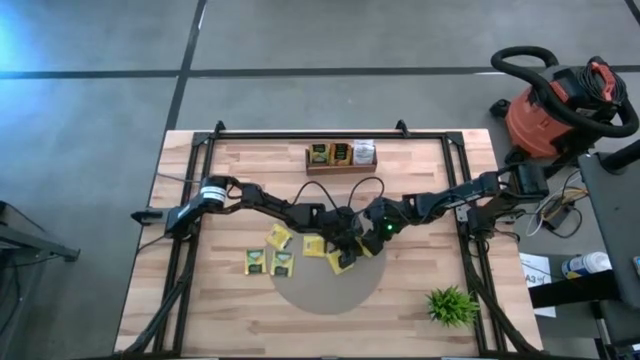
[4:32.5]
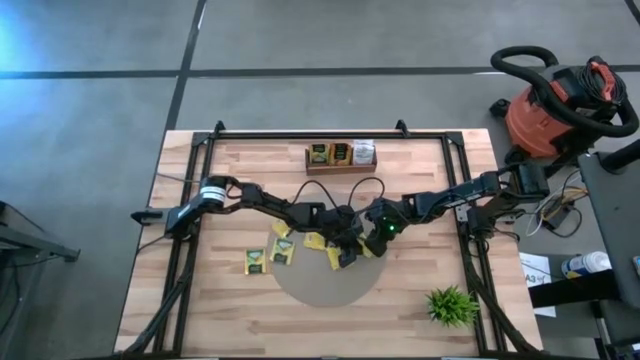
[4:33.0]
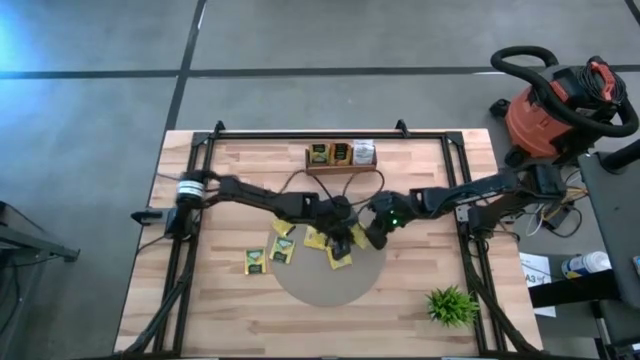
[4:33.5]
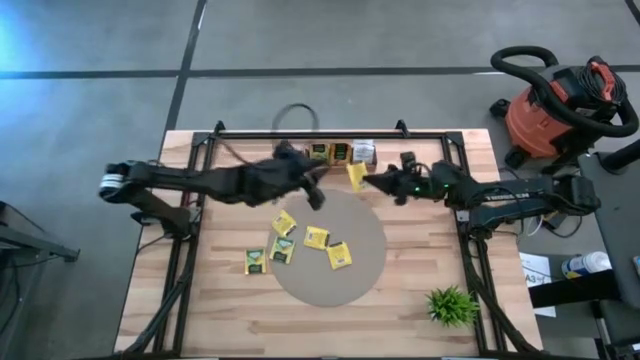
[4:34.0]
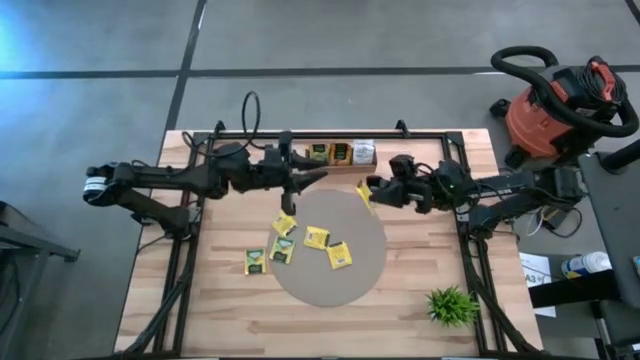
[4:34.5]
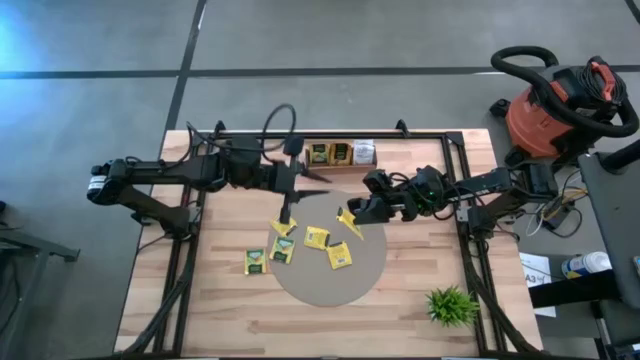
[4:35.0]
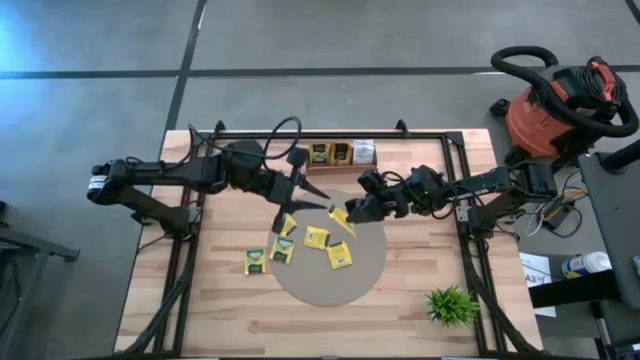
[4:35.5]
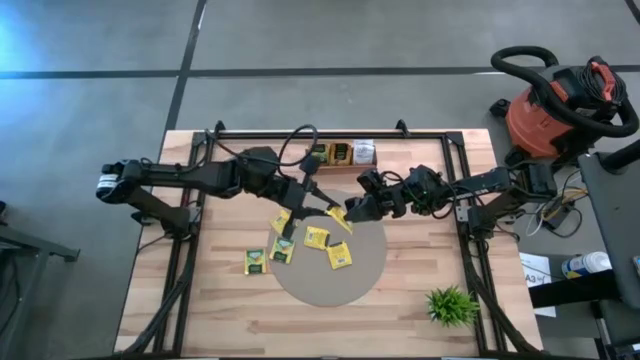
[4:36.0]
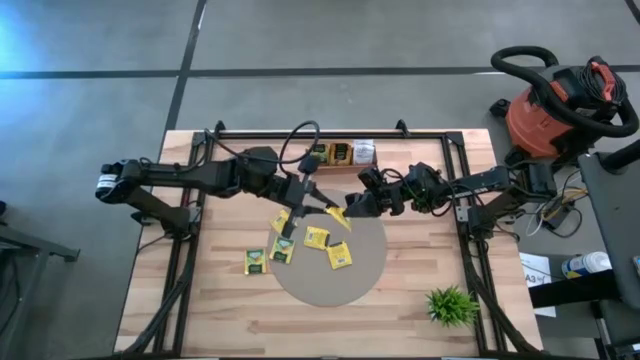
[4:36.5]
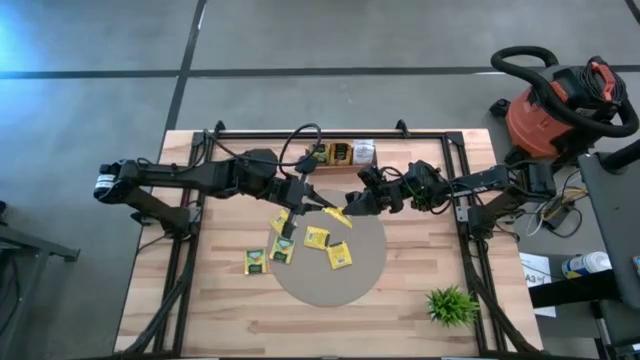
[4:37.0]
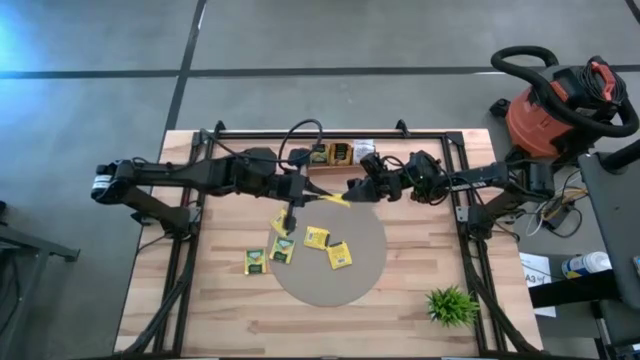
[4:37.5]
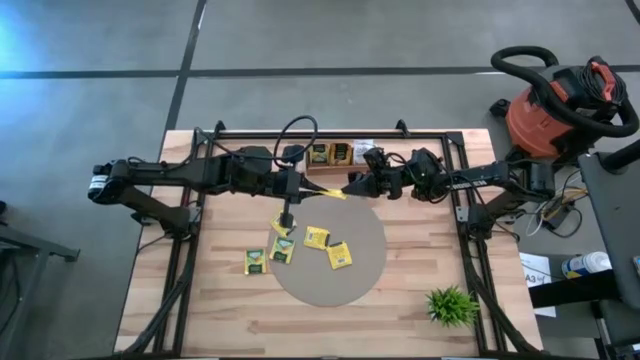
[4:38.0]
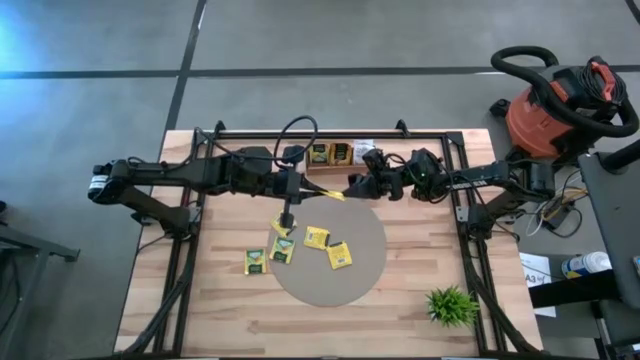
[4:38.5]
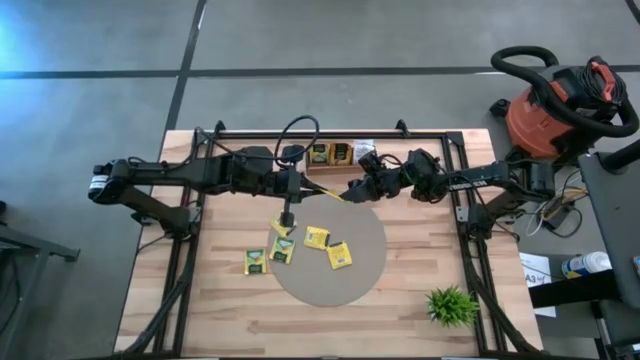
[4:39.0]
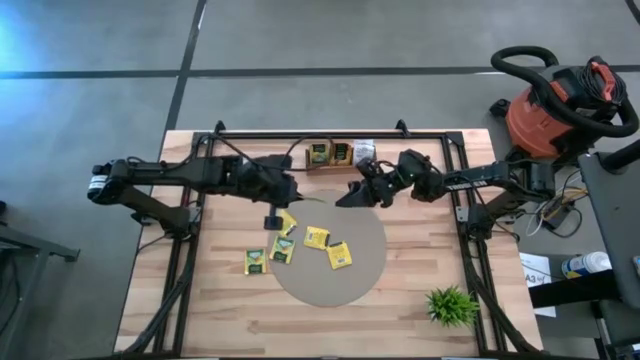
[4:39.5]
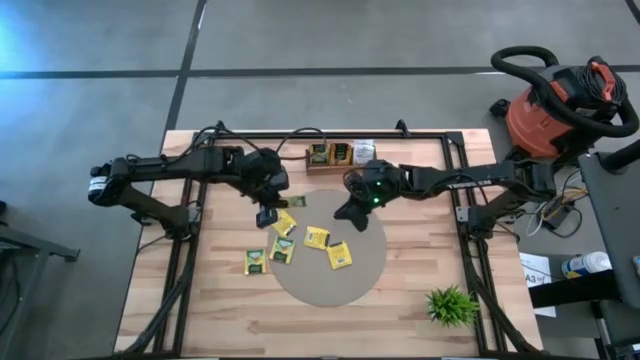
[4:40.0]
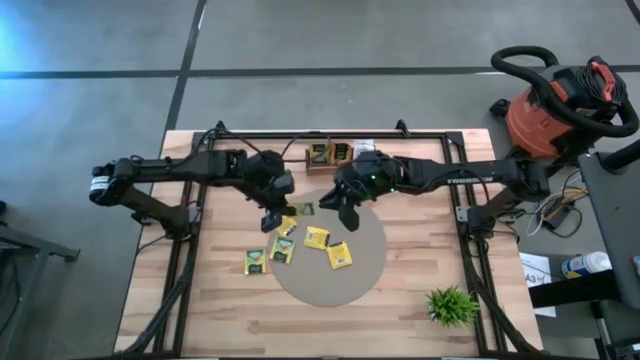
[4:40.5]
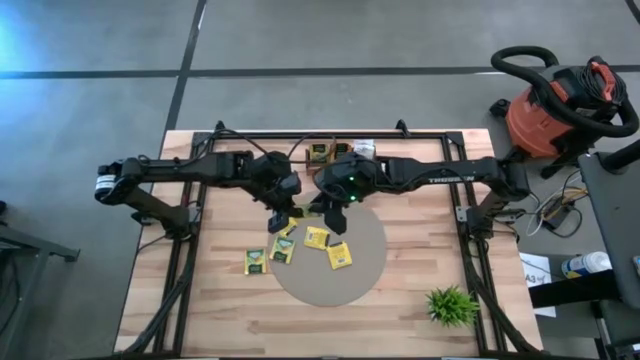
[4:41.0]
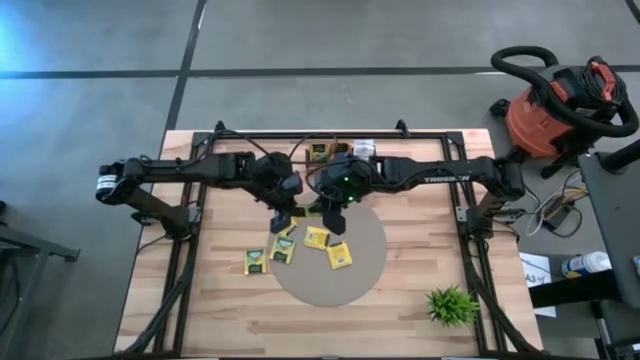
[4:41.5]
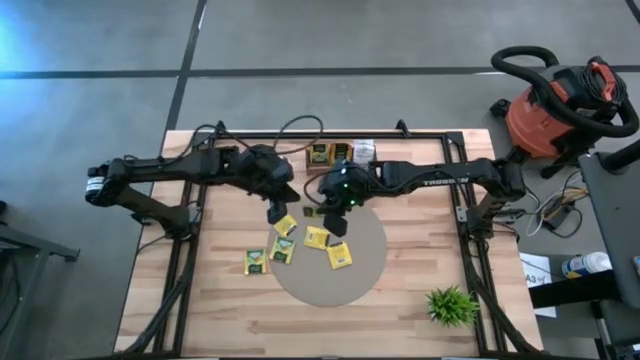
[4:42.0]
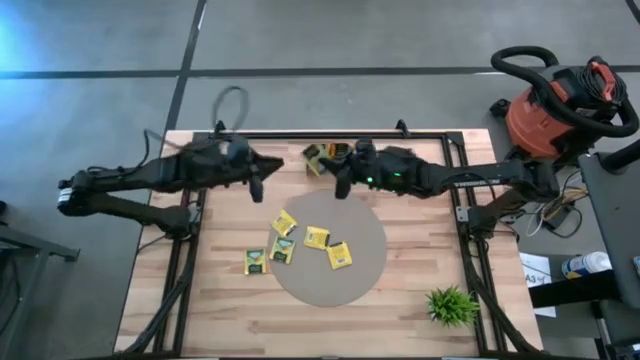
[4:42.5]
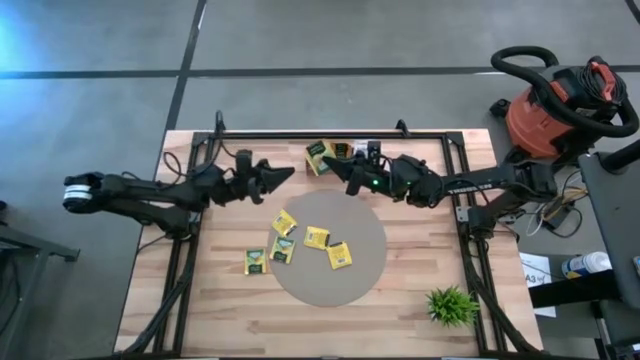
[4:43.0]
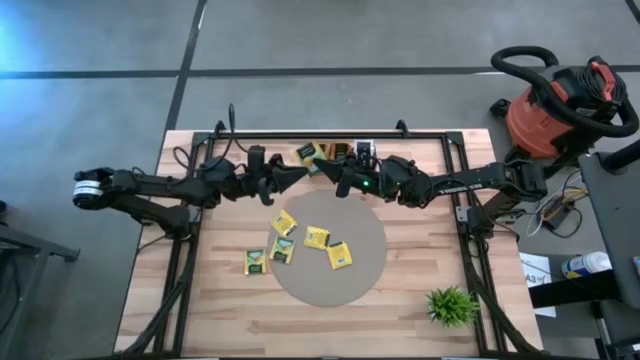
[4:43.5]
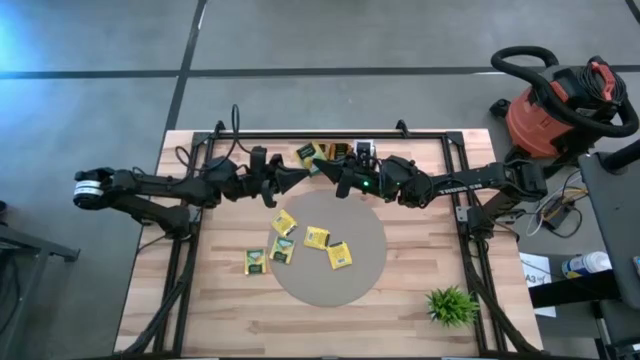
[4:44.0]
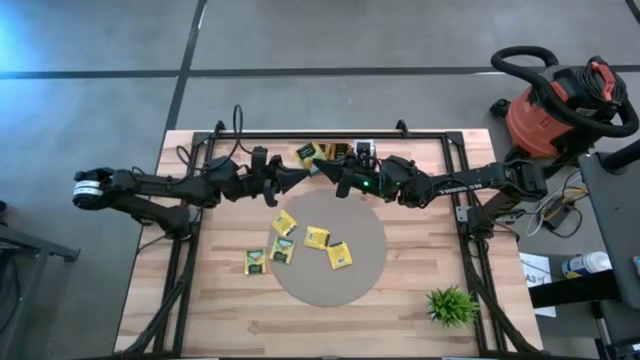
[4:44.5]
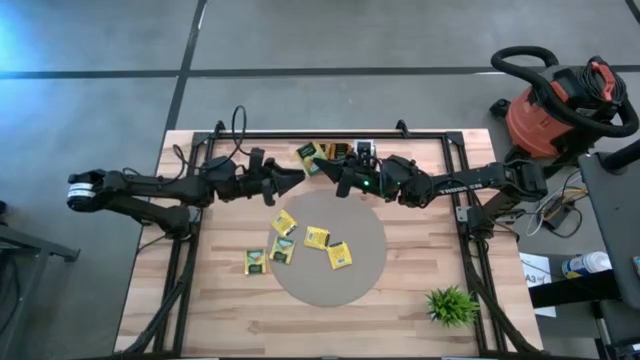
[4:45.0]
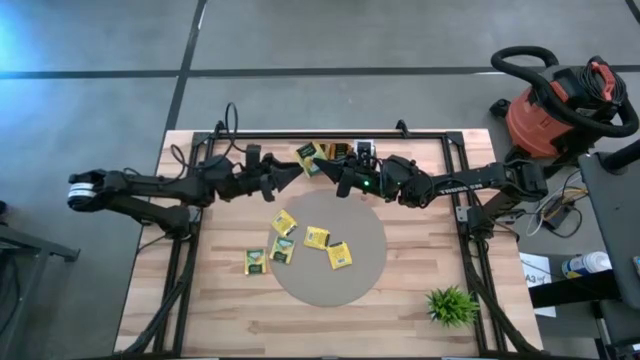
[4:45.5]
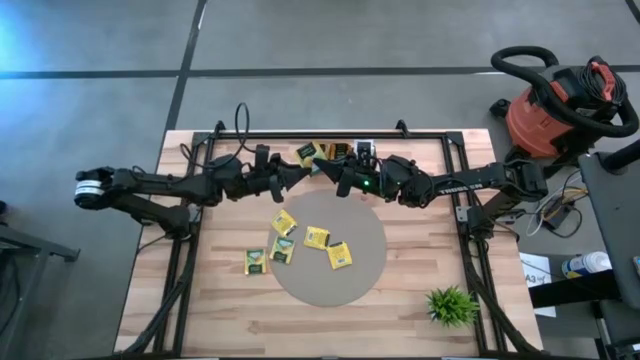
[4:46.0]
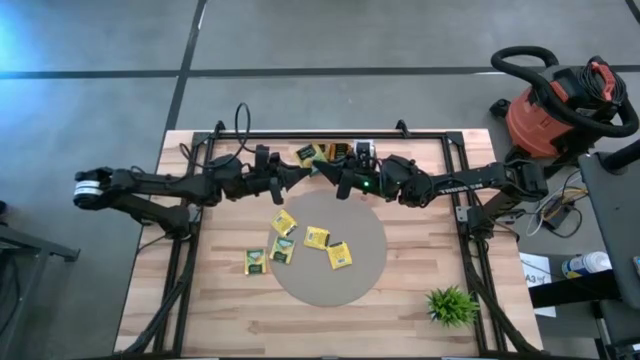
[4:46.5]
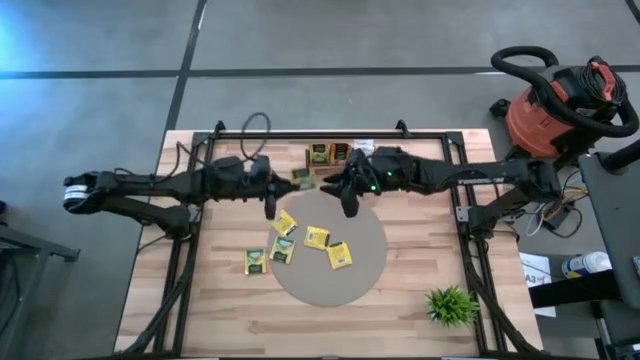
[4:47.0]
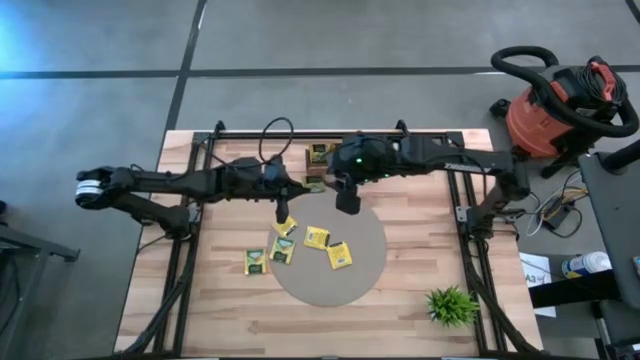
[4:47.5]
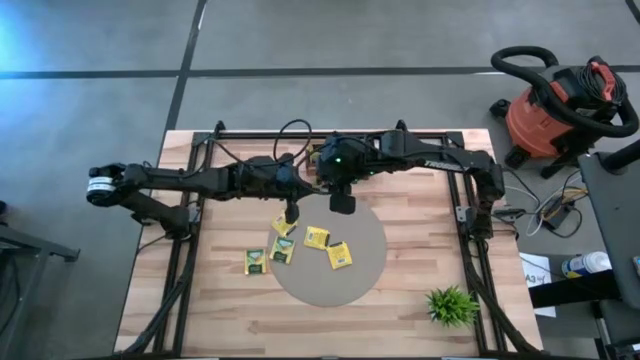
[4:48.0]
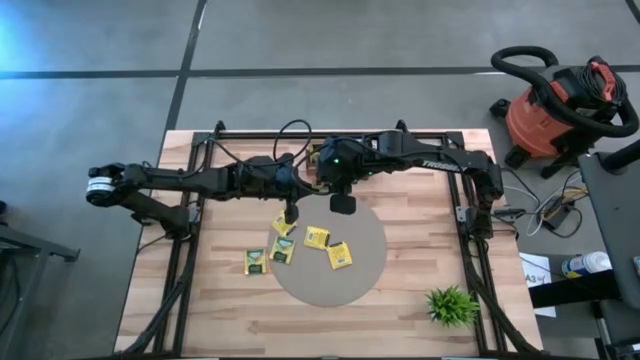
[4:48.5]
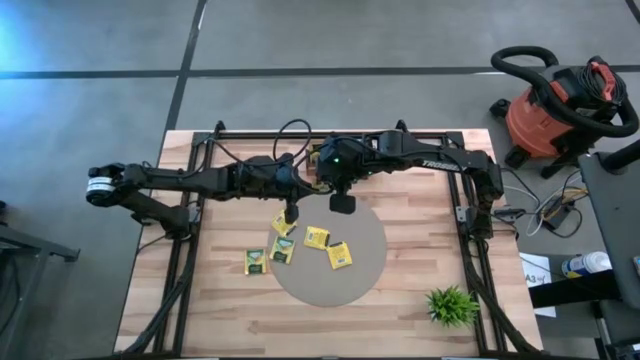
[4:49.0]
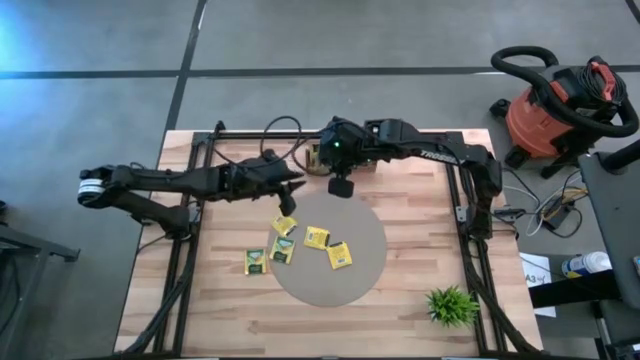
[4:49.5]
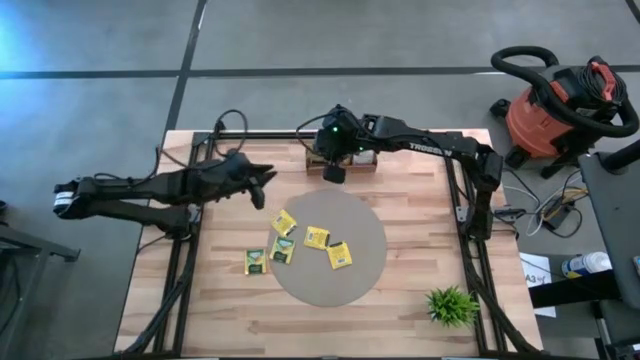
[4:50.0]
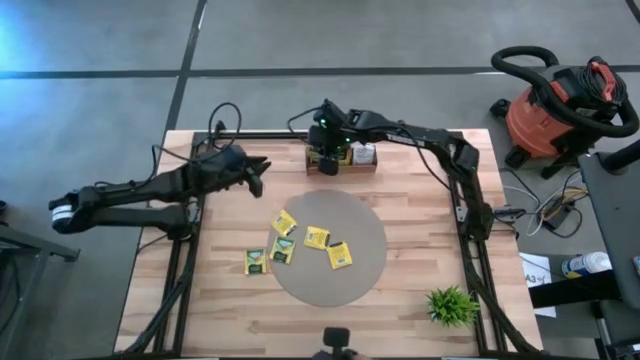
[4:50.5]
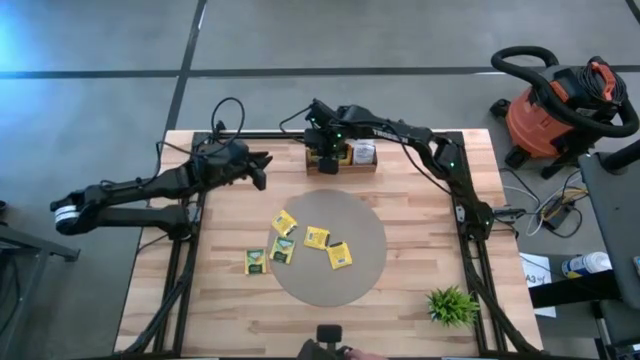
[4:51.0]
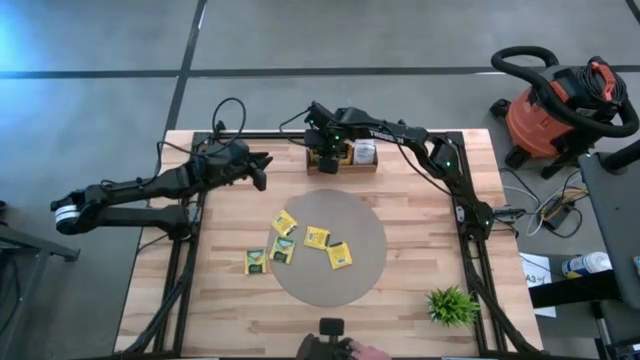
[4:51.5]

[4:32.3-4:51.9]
Task: Pick & Place Tea
Put the yellow tea bag into the left compartment of the wooden organizer

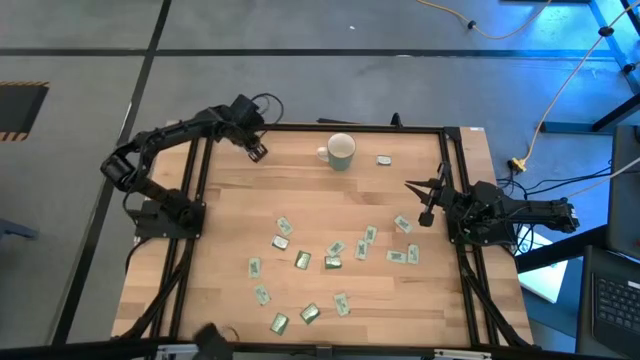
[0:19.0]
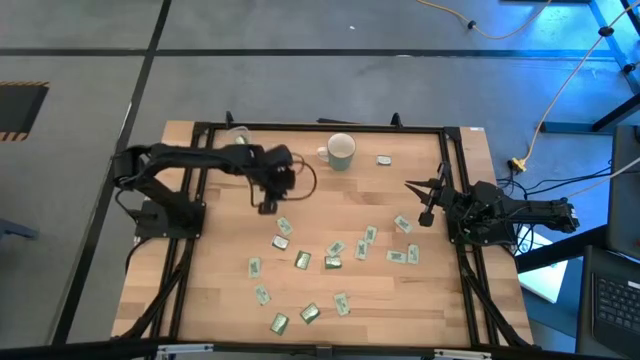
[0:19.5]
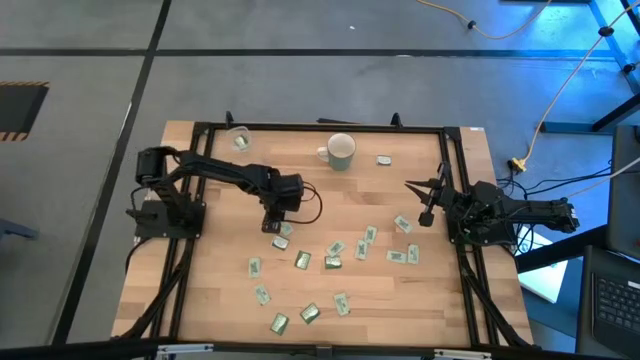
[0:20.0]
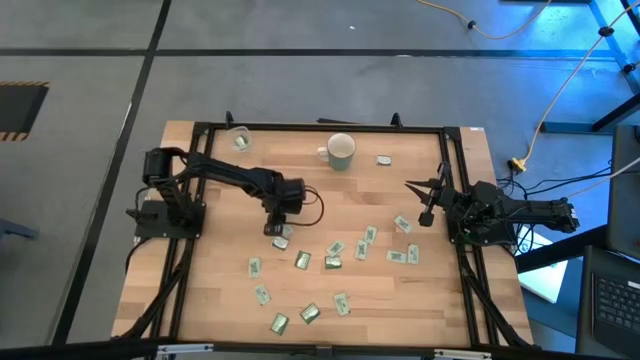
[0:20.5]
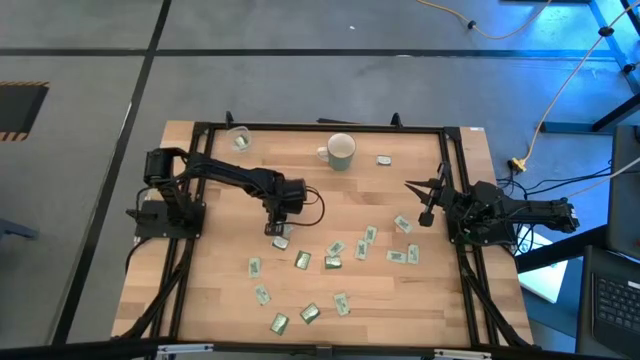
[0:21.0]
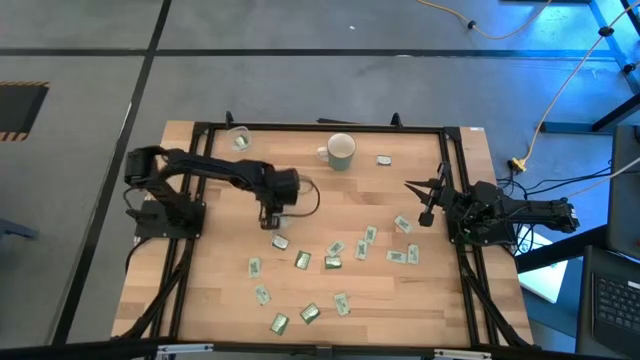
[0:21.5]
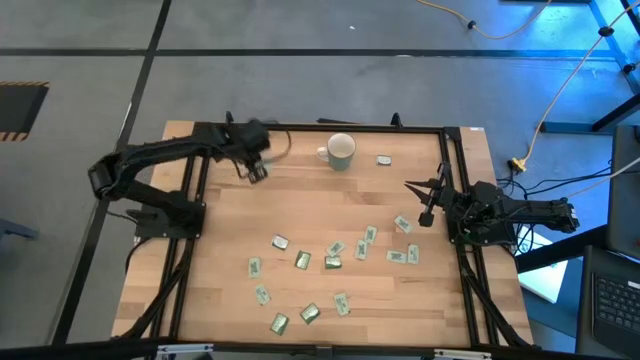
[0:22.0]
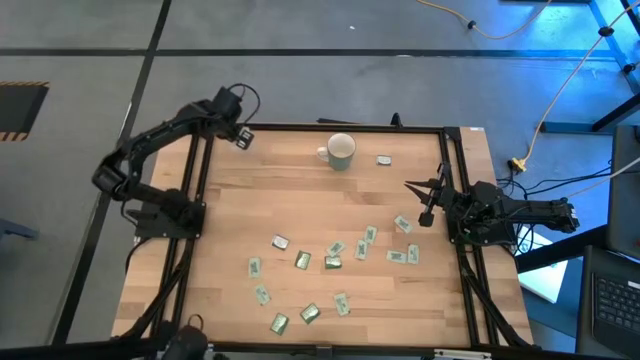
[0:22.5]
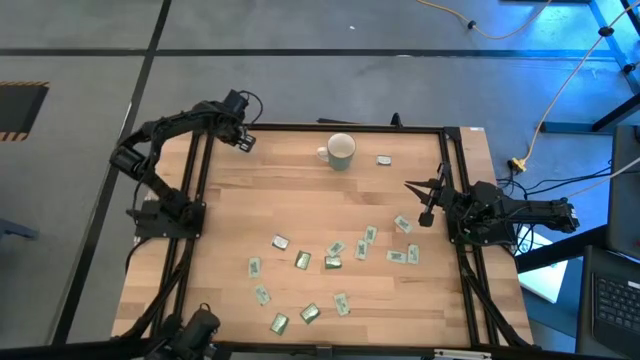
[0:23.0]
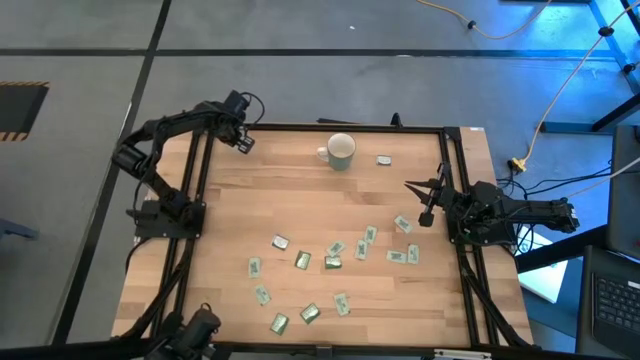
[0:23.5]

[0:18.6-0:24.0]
Task: Pick and place Stevia / Truvia into bins
Put the stevia packet into the transparent bin
